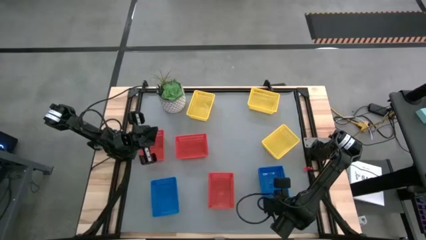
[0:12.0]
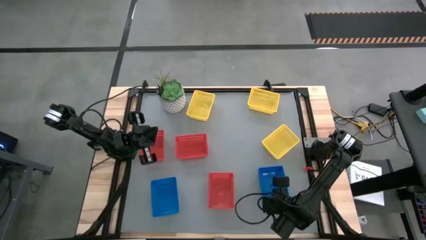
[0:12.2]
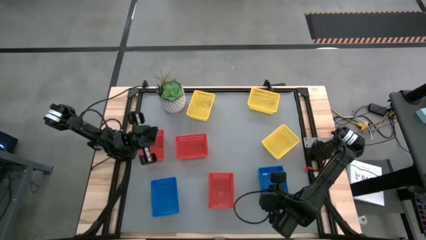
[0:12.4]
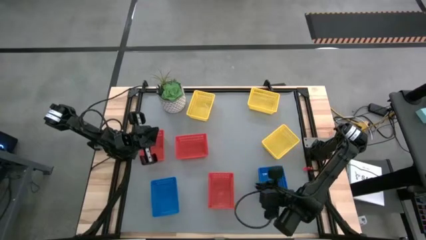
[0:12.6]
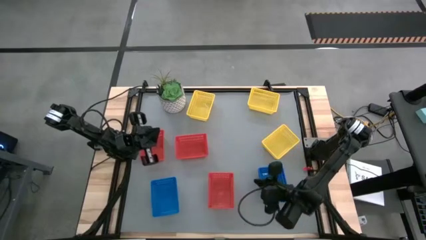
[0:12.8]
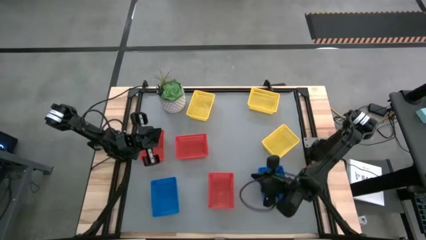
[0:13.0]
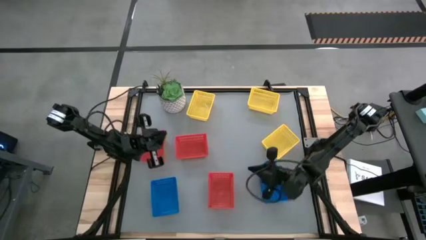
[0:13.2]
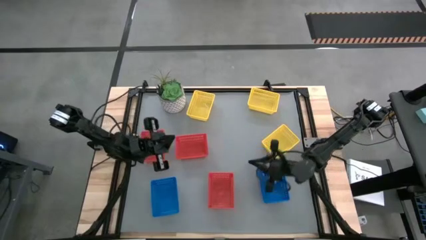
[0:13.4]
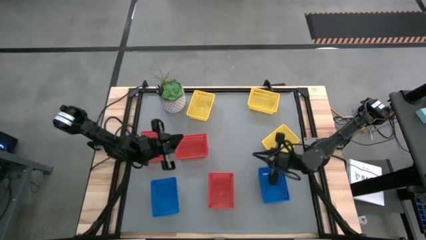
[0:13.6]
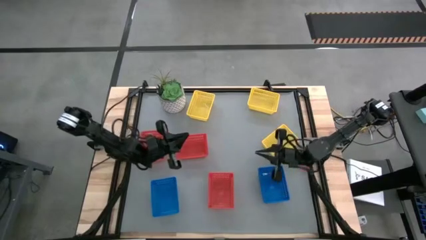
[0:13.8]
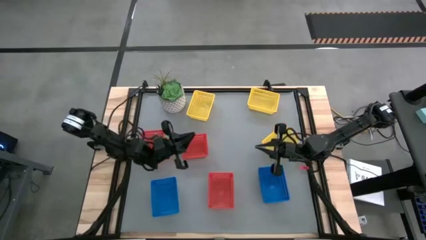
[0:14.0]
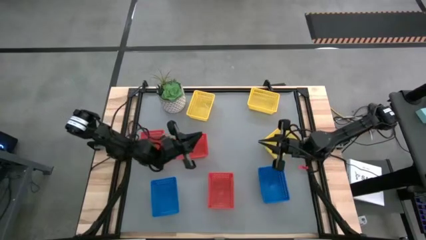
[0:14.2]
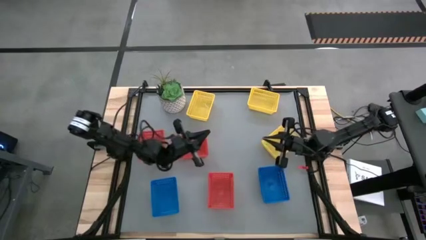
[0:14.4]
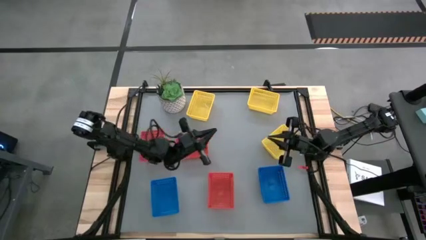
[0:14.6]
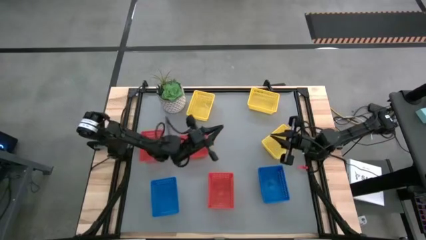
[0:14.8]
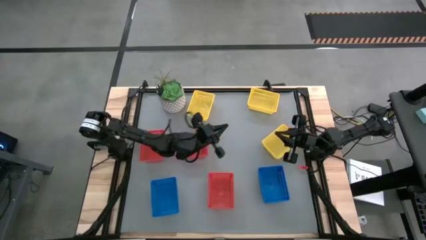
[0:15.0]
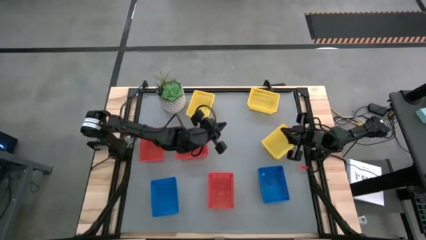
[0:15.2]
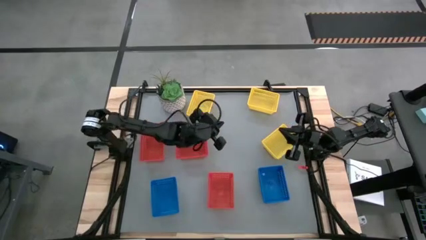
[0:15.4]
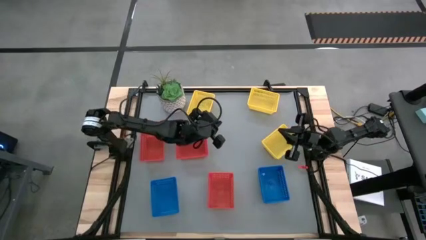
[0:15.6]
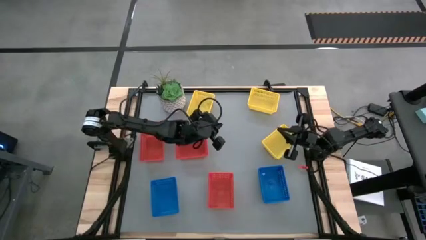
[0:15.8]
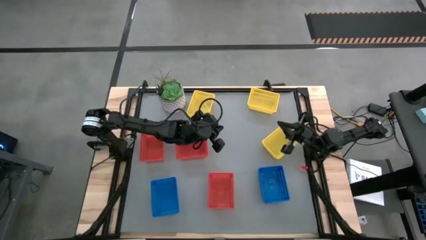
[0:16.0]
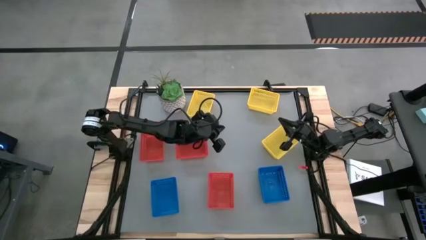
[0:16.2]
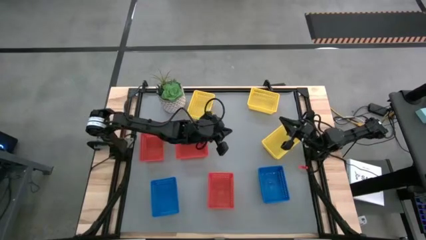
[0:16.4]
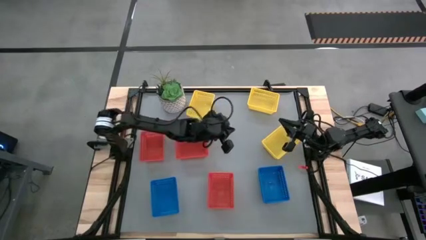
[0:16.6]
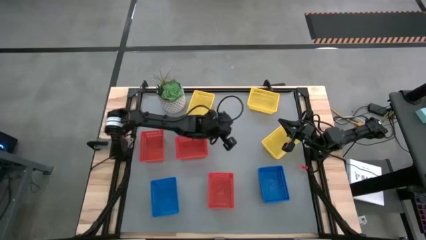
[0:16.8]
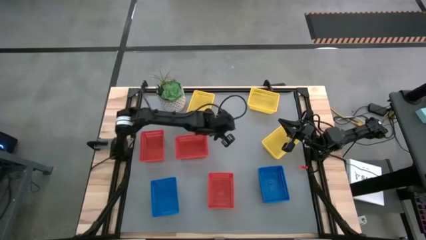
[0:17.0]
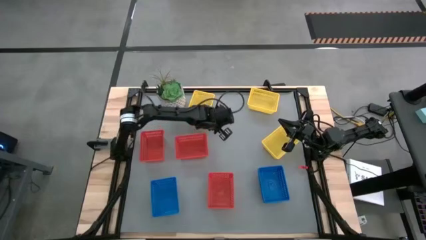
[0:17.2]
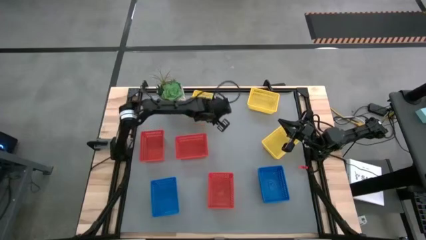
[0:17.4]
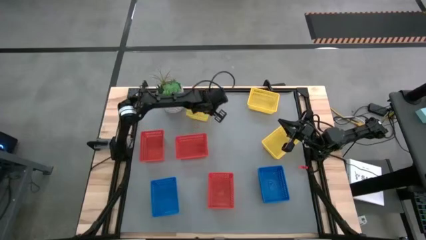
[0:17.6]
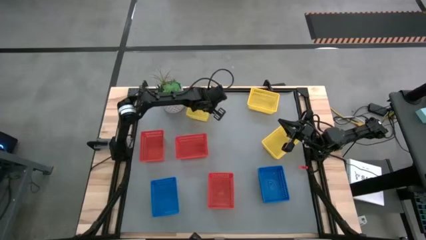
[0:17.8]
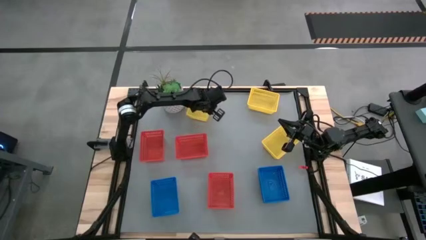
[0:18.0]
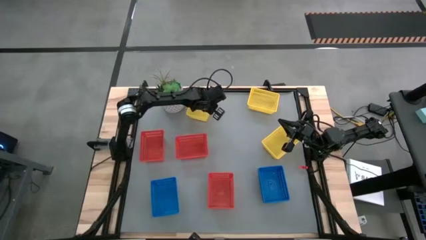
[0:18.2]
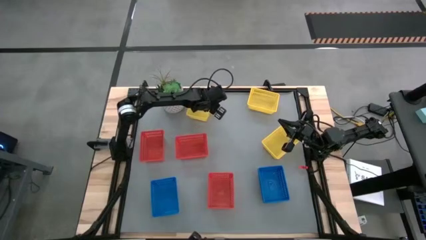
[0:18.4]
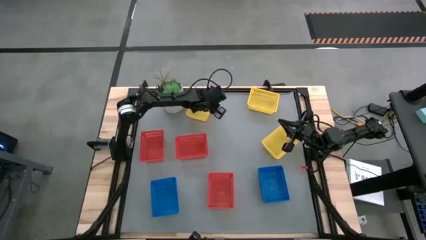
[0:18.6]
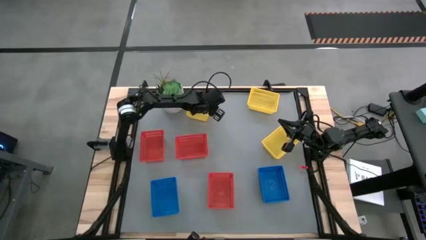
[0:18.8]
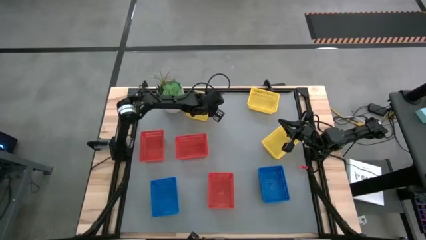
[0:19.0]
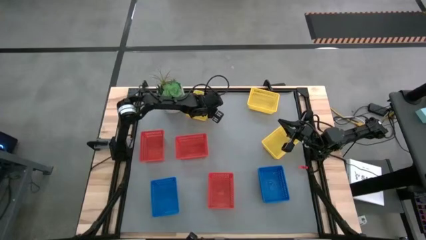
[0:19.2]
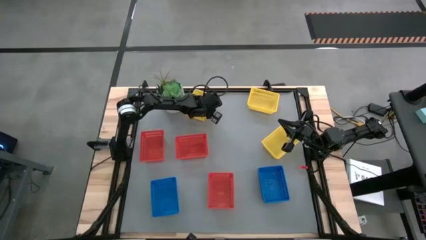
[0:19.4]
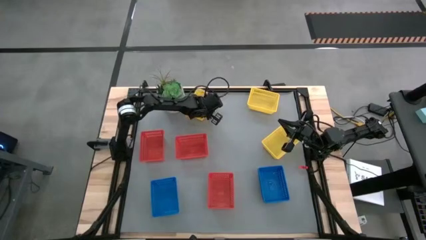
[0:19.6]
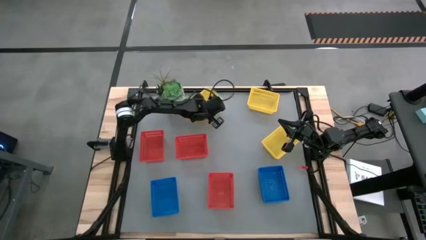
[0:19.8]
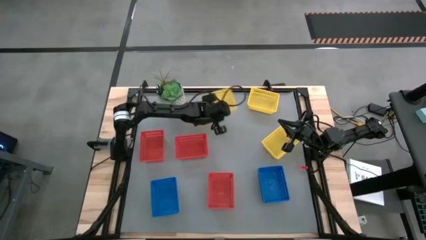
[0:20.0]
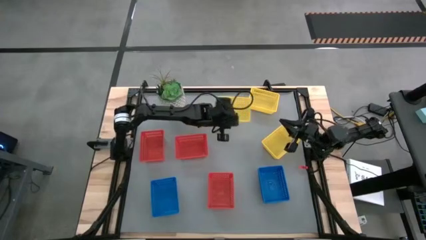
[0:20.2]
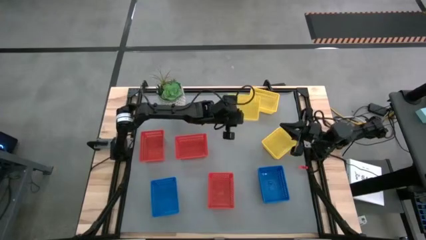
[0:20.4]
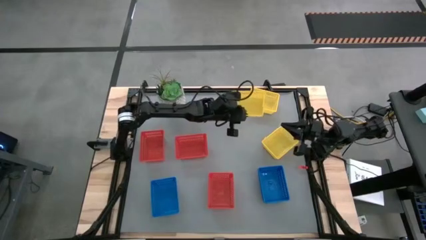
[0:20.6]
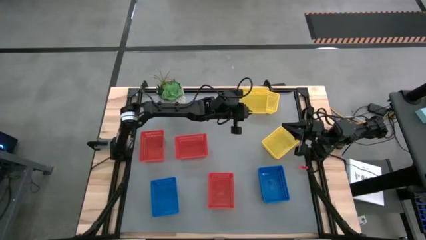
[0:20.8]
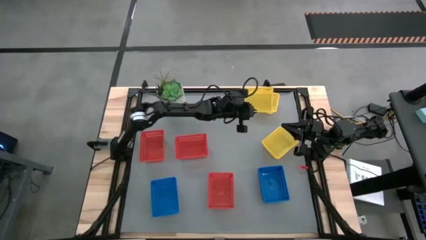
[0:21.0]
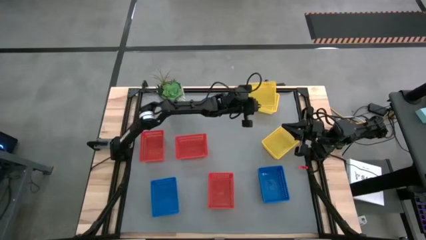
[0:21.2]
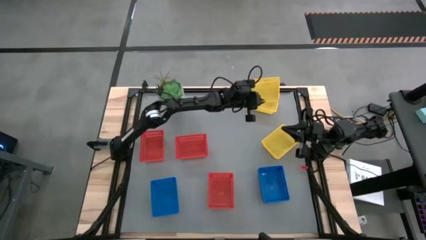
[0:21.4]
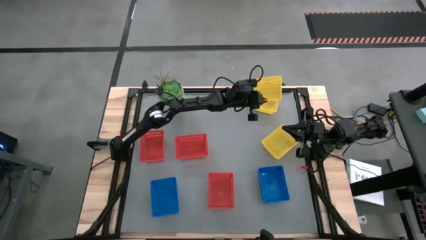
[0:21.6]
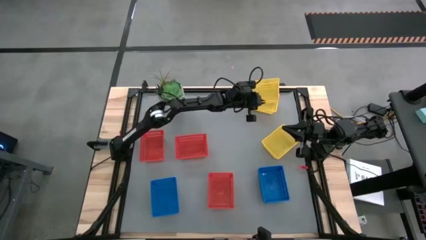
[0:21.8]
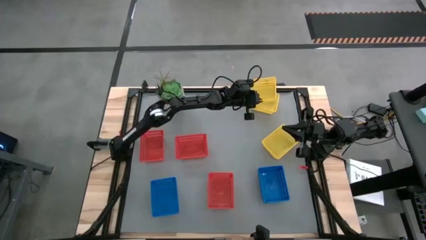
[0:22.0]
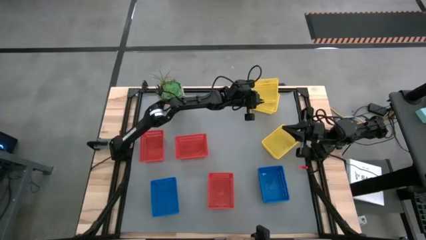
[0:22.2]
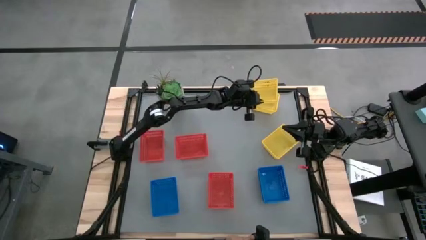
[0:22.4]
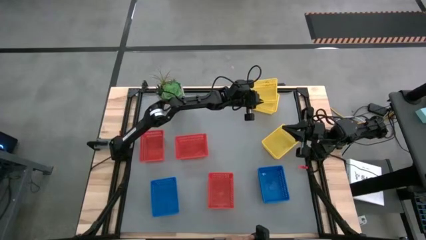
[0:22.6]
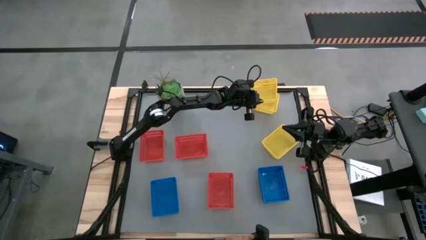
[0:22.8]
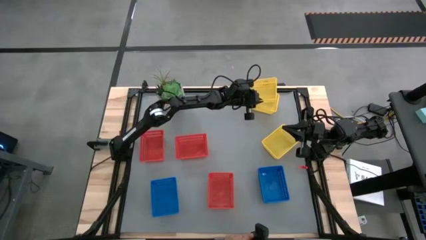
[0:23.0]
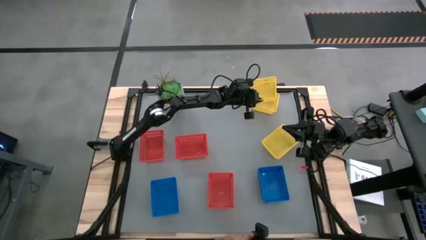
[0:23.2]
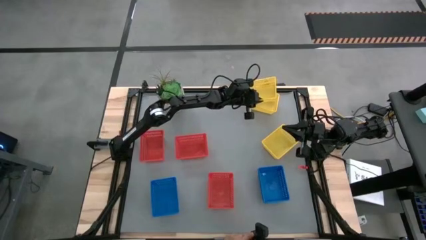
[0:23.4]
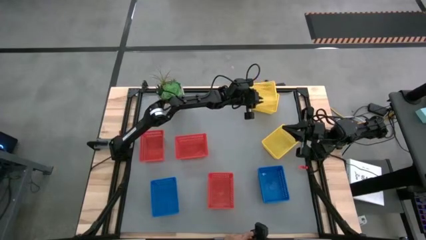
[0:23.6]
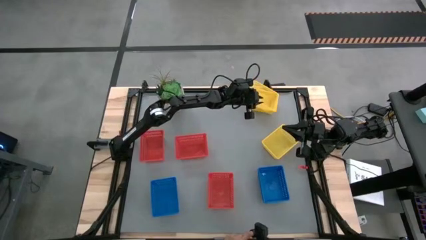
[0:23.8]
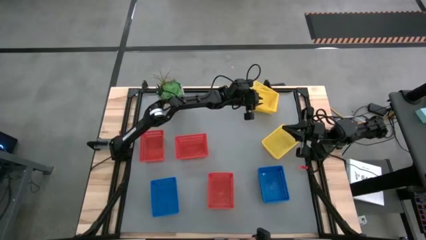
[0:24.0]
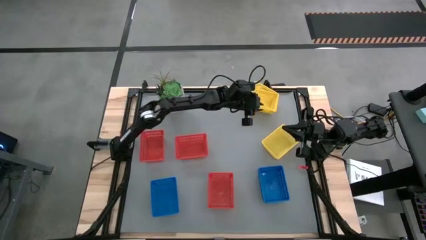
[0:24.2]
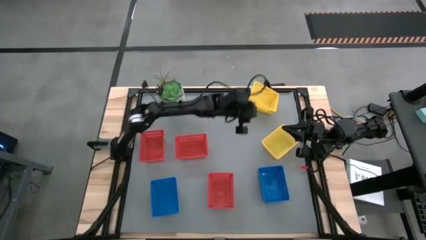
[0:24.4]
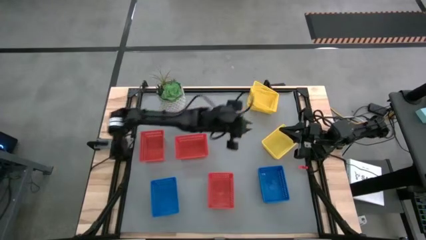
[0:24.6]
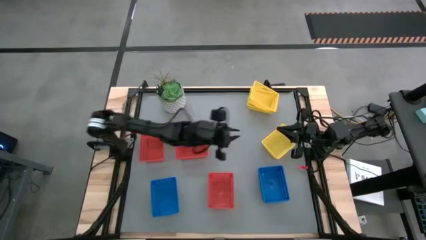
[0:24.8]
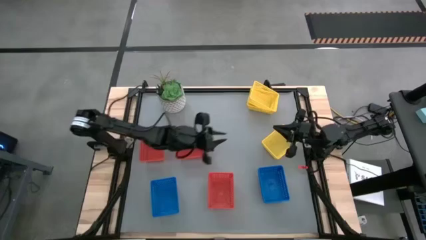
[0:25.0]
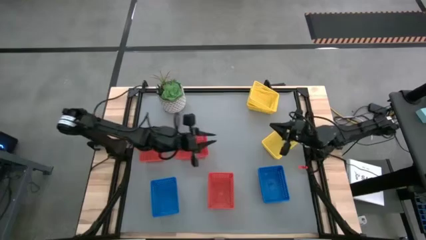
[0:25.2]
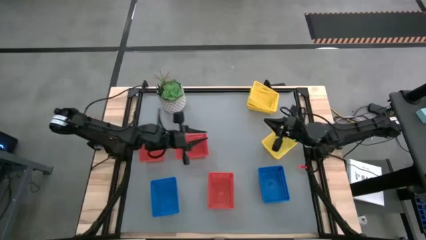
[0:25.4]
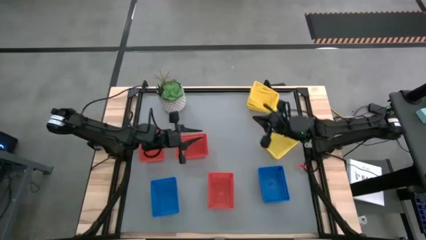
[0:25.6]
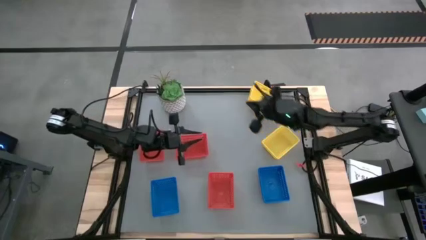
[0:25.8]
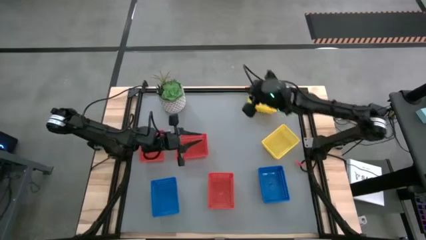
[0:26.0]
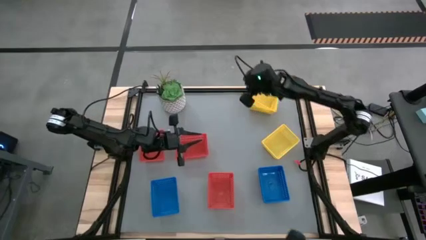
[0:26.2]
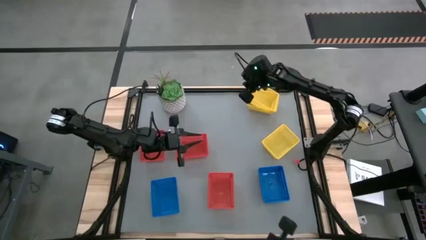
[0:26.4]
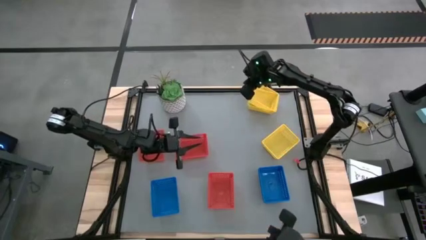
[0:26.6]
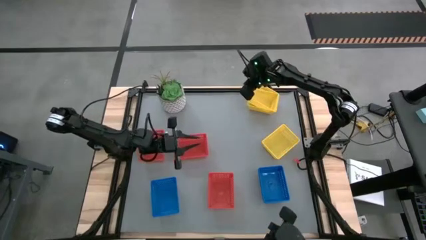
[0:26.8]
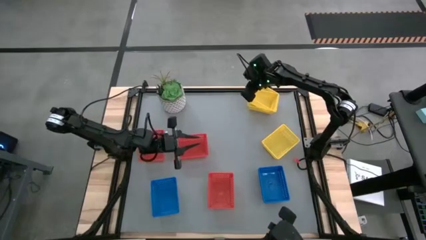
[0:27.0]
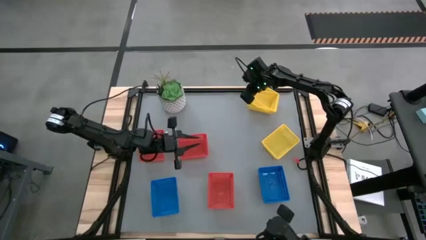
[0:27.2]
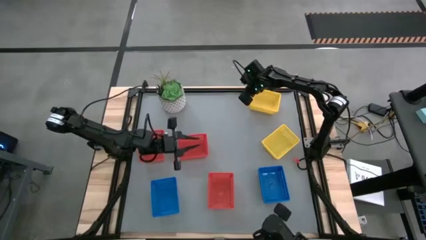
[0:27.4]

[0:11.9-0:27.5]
Stack the top left yellow bin on top of the top right yellow bin
